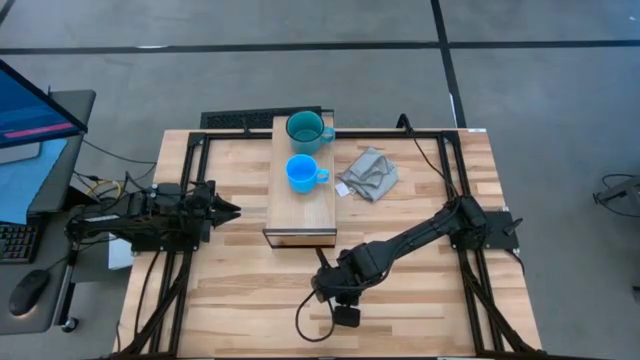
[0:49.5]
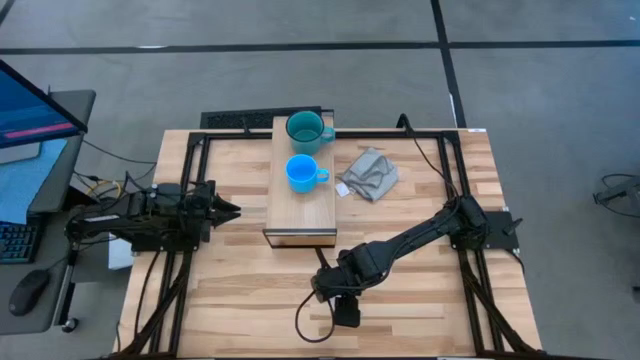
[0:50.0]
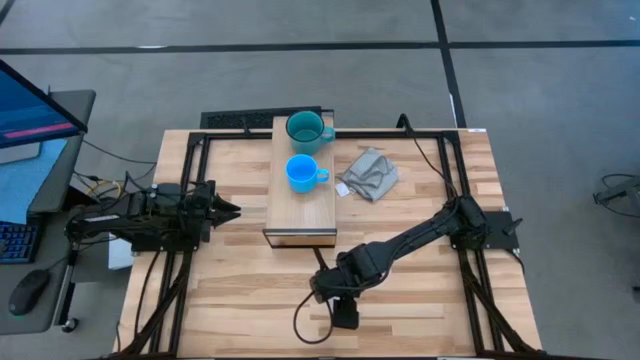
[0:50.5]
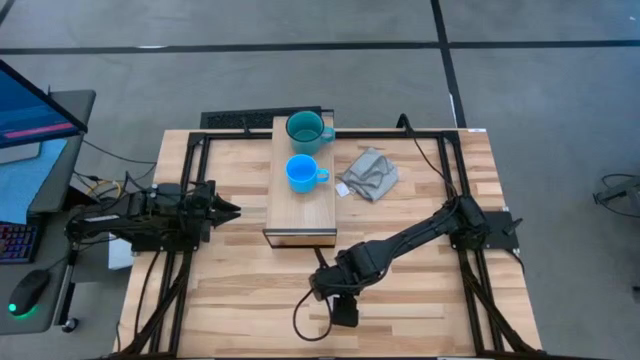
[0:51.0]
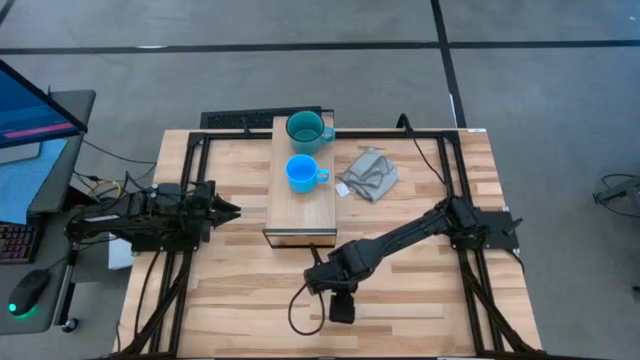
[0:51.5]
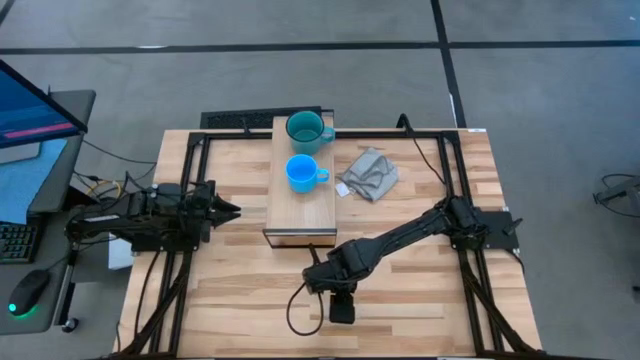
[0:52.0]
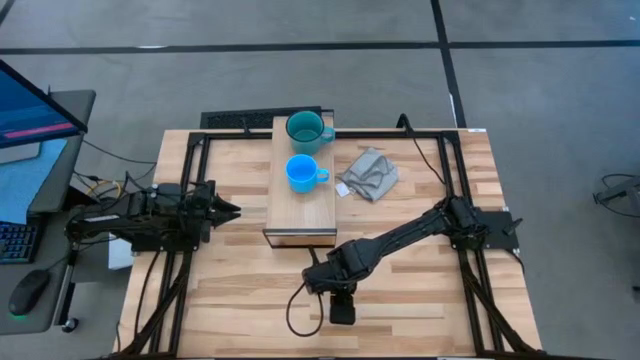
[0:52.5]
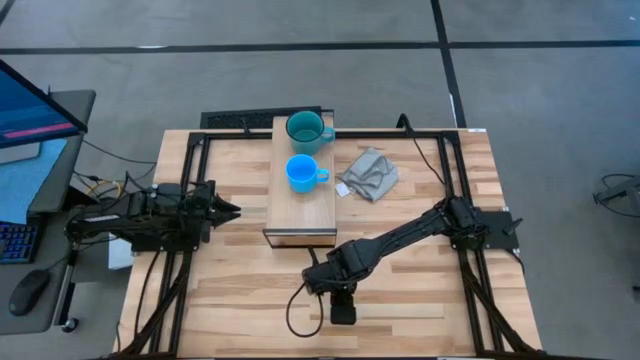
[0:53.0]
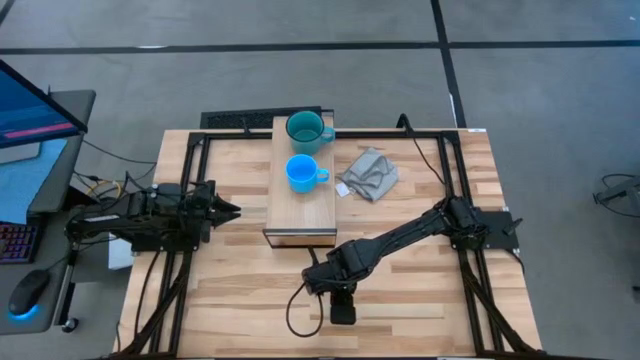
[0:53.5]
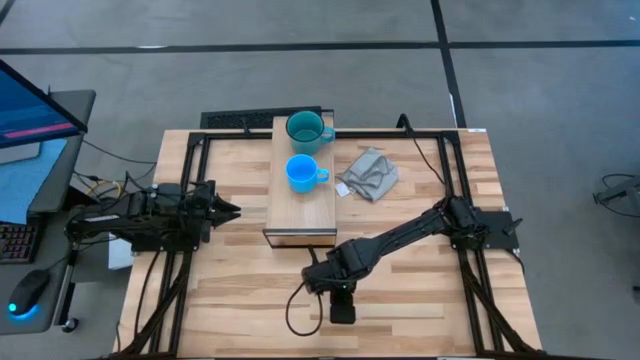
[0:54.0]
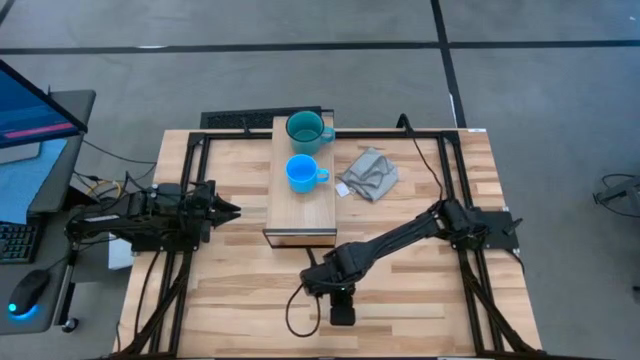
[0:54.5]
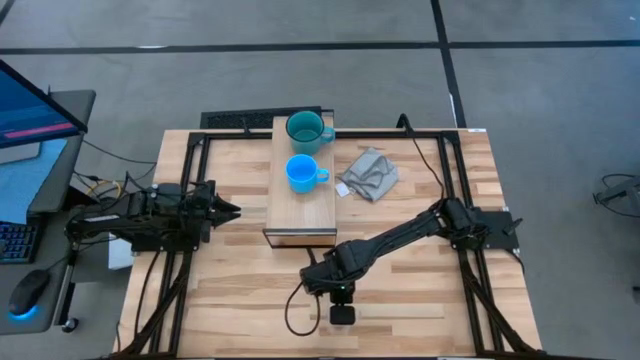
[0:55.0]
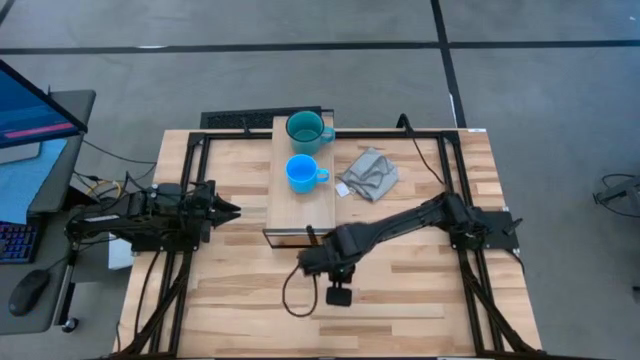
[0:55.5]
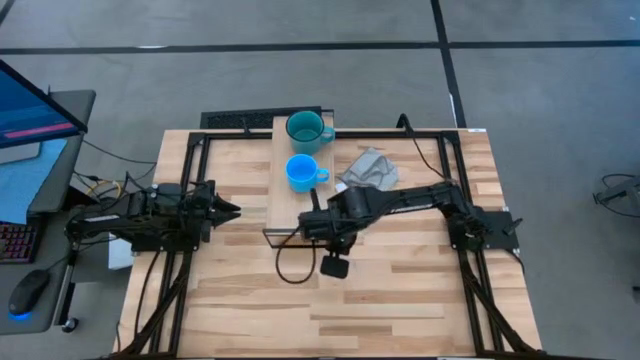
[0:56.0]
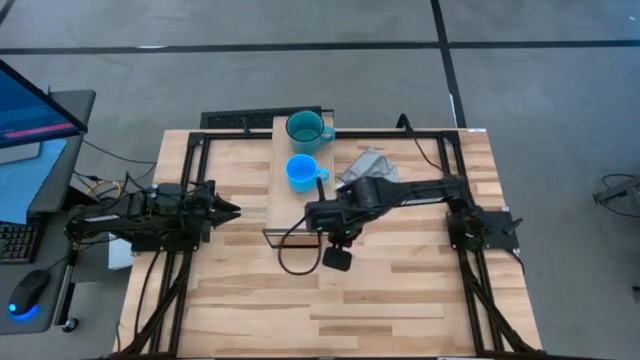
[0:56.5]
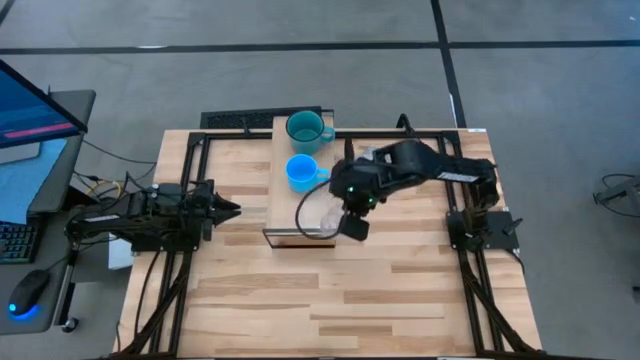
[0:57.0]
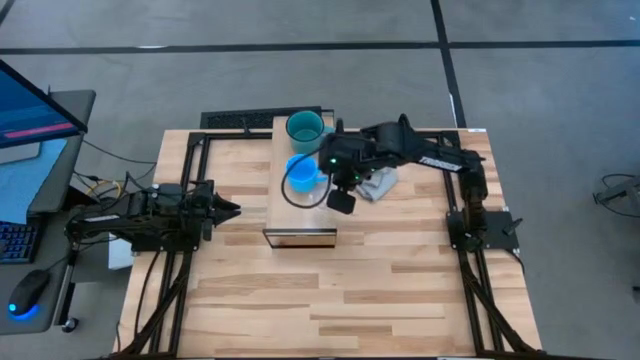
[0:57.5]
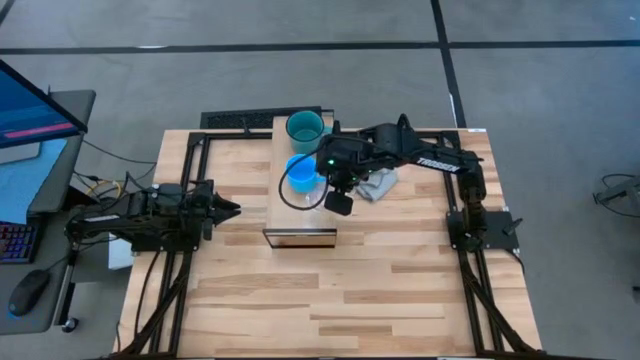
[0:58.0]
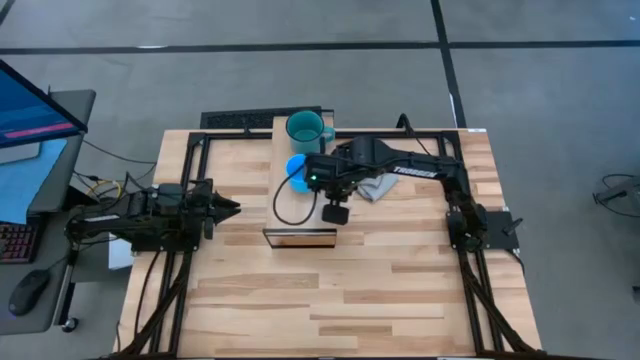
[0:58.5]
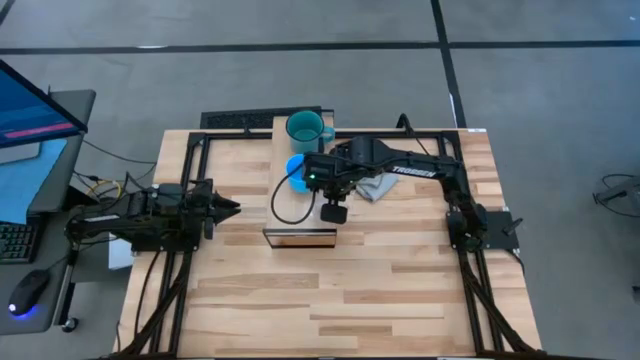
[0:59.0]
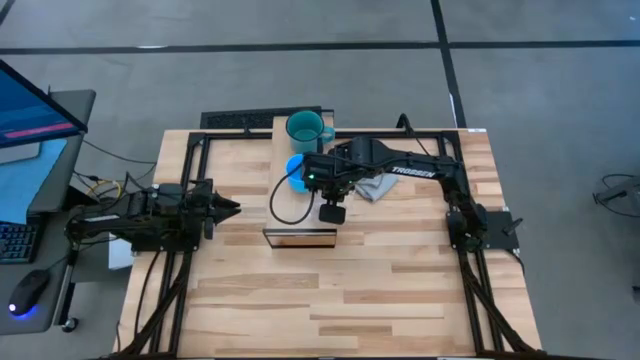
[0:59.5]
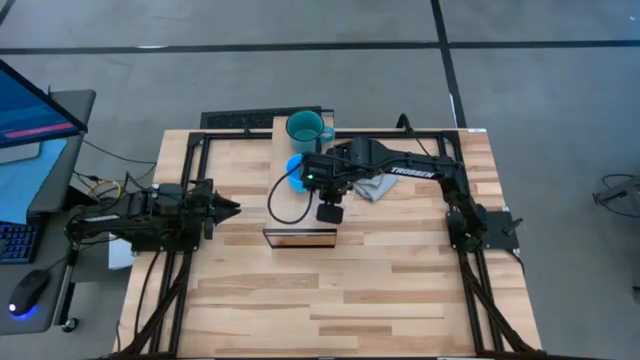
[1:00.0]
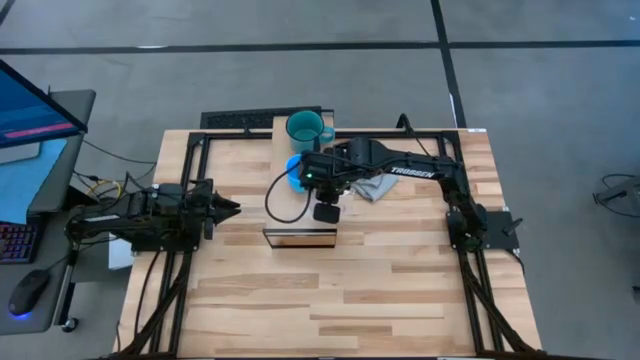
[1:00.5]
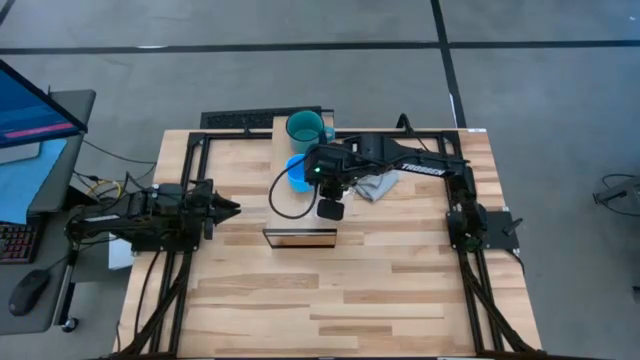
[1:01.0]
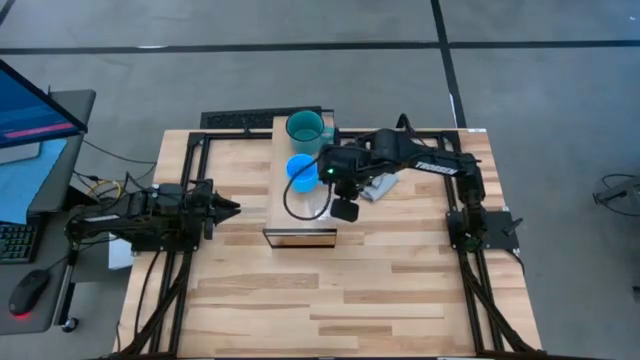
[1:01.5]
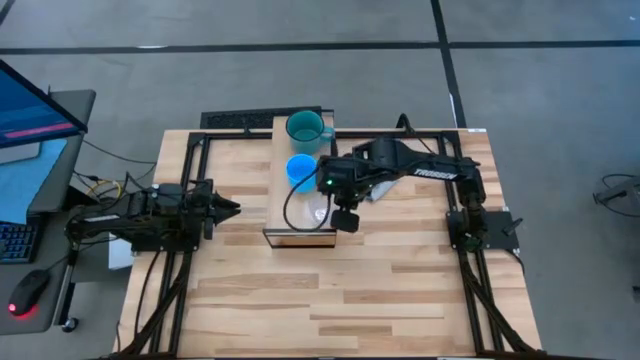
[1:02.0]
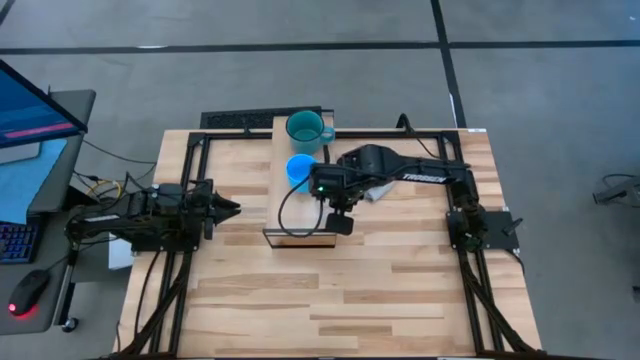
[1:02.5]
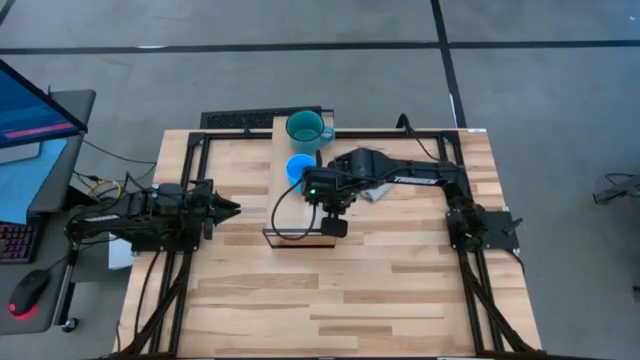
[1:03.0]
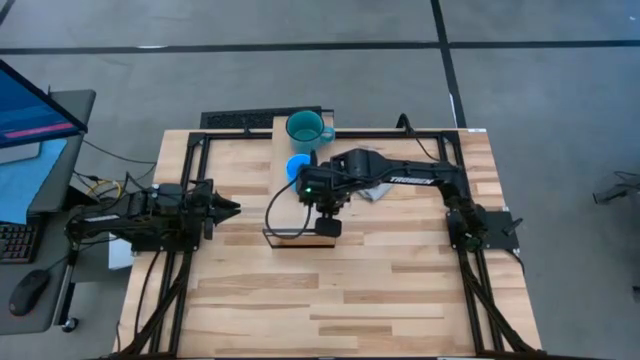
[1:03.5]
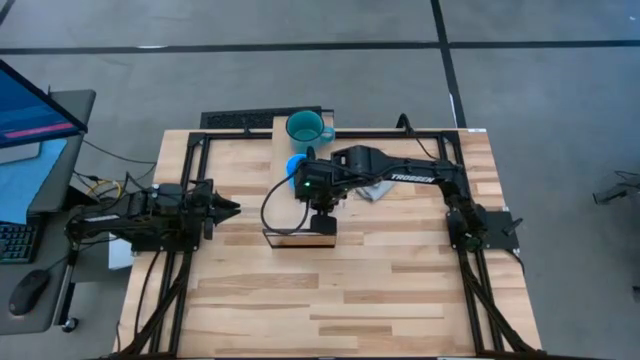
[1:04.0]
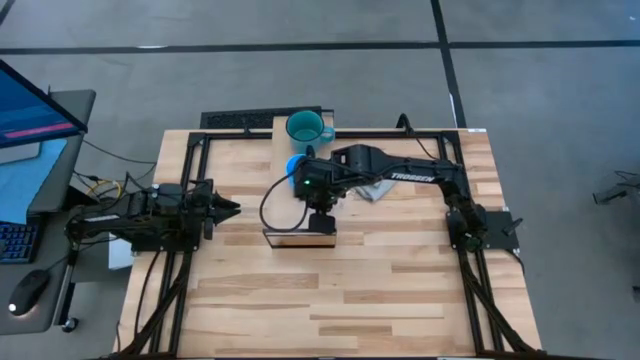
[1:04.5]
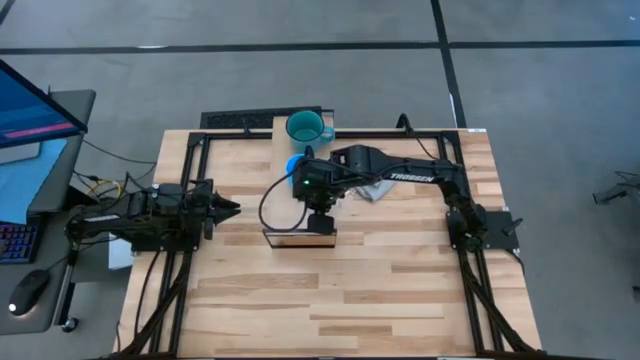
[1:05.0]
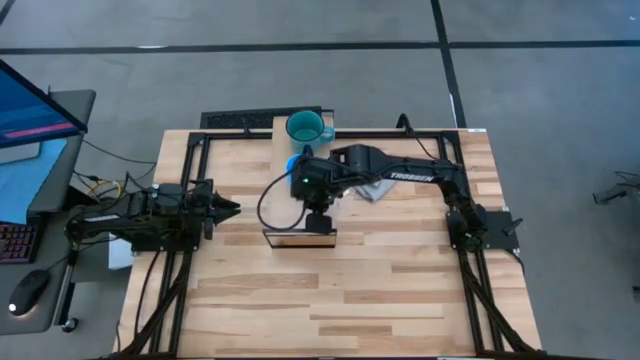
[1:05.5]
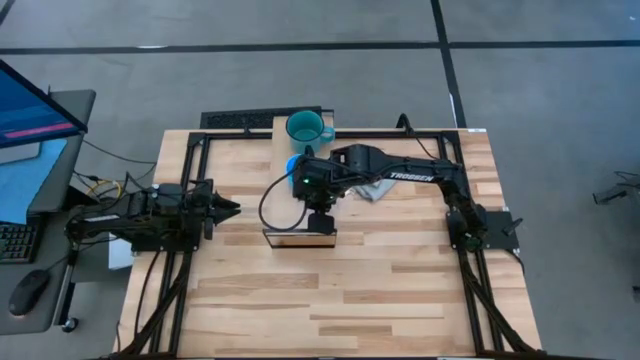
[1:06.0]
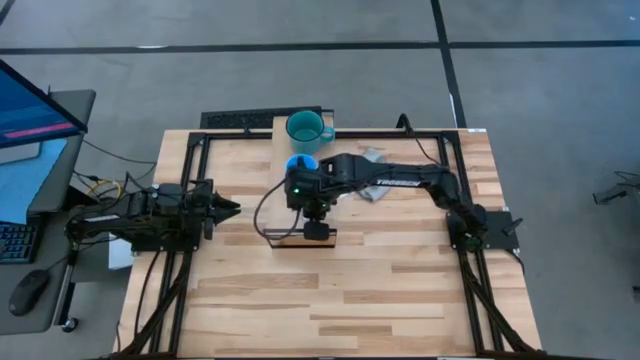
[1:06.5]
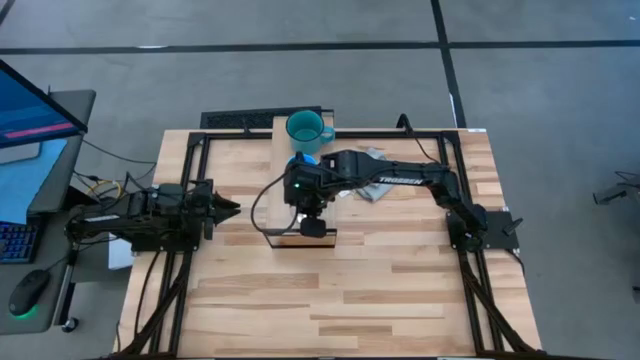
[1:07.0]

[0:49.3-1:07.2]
Task: Stack small to large cups/mugs on shelf
Put the transparent mug on the shelf
